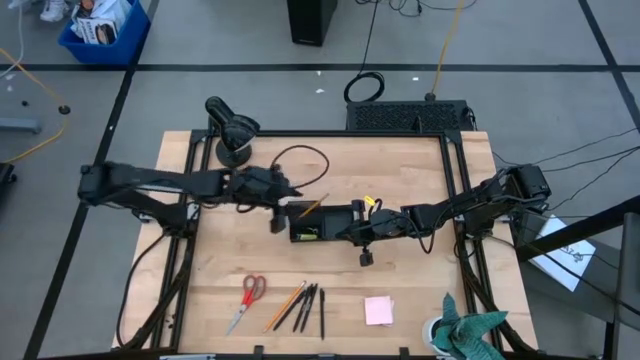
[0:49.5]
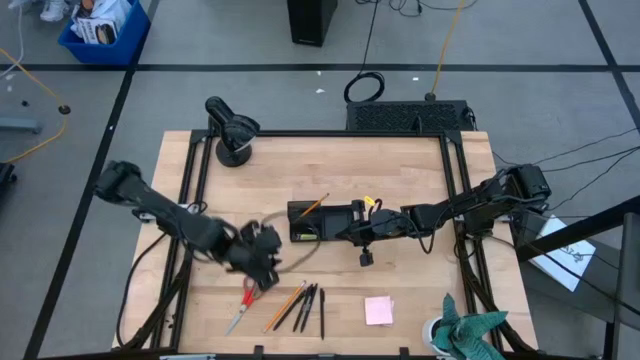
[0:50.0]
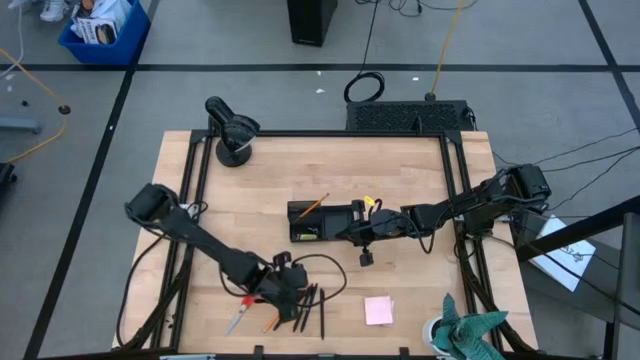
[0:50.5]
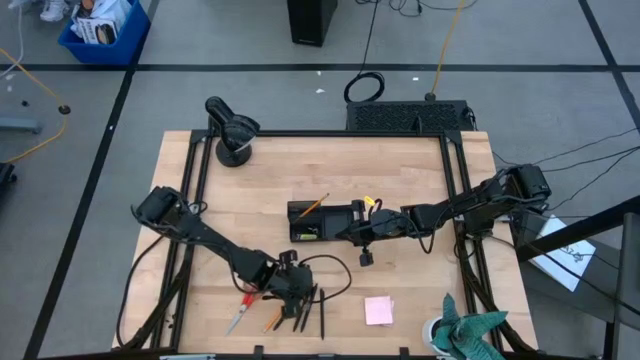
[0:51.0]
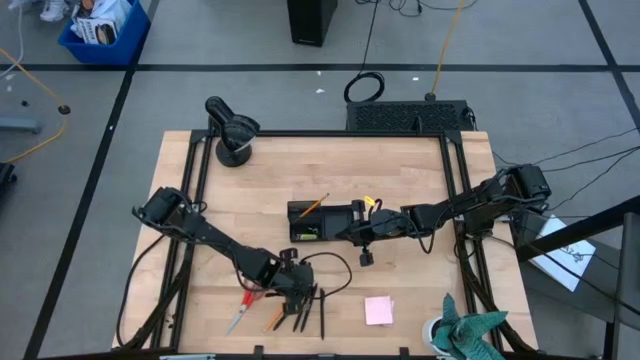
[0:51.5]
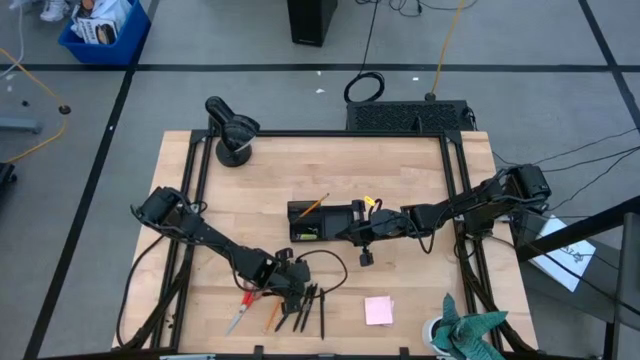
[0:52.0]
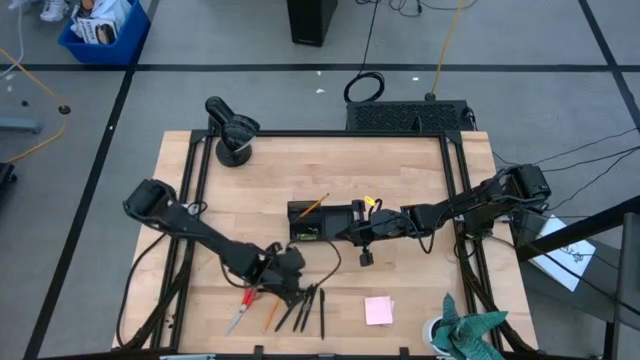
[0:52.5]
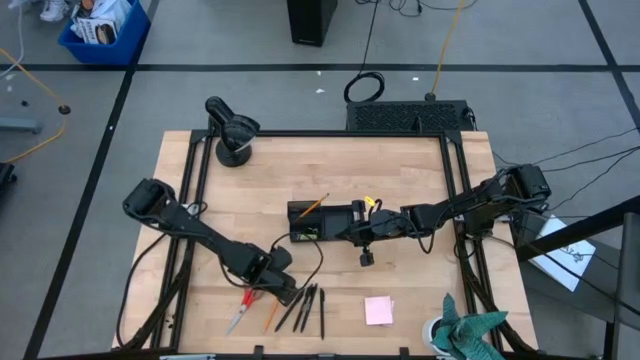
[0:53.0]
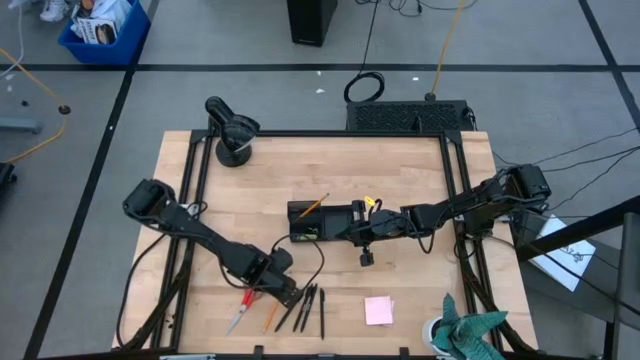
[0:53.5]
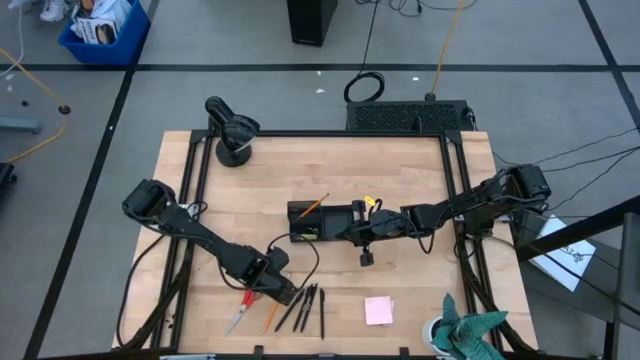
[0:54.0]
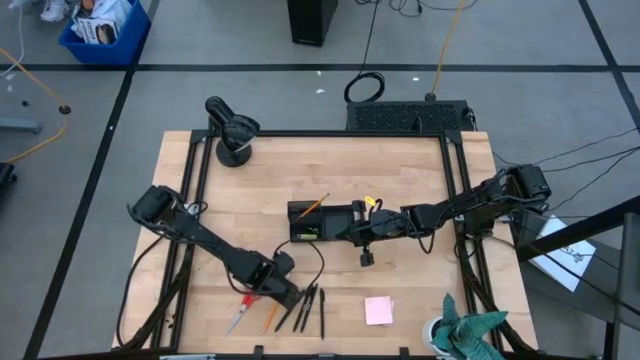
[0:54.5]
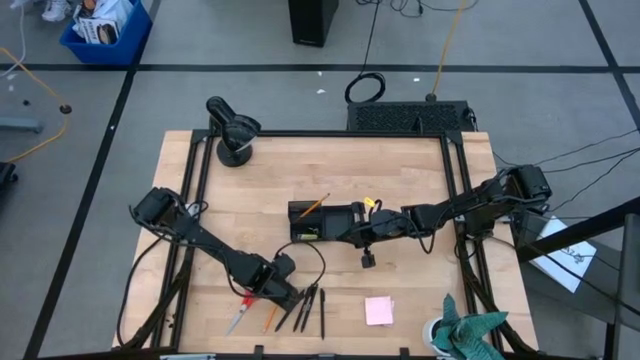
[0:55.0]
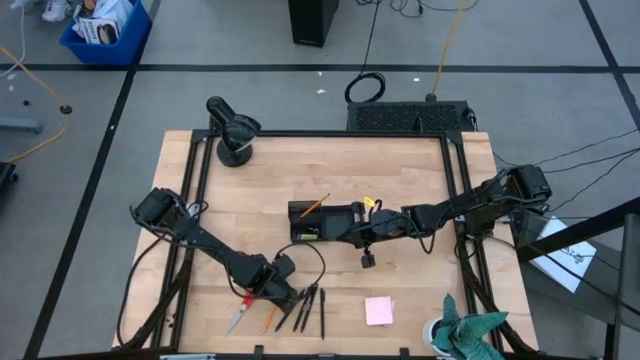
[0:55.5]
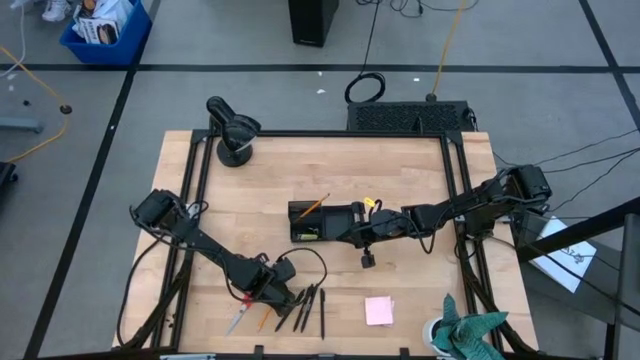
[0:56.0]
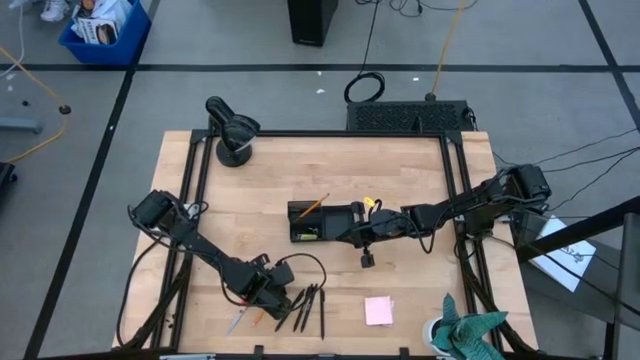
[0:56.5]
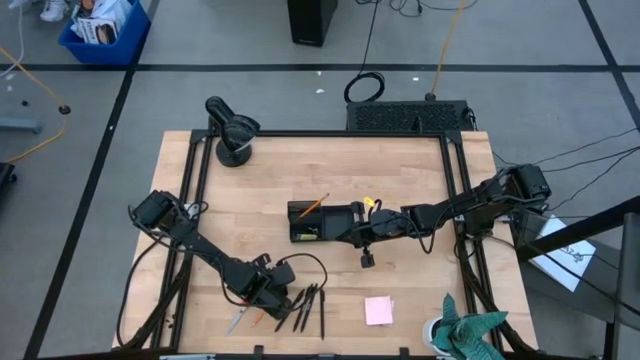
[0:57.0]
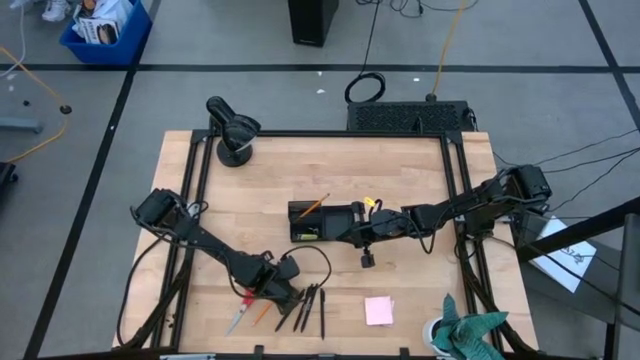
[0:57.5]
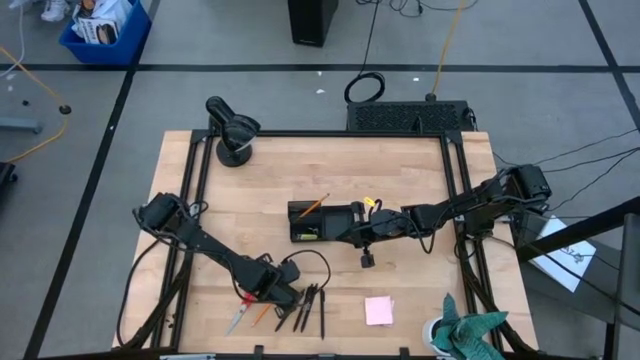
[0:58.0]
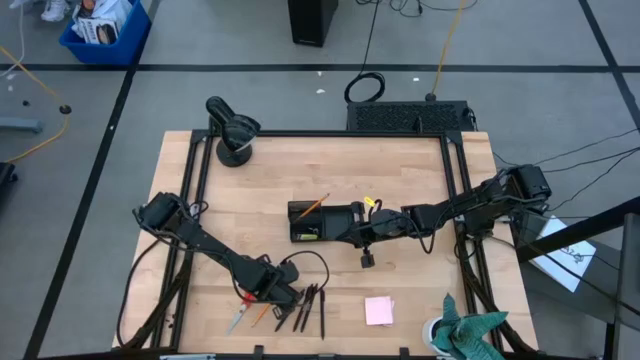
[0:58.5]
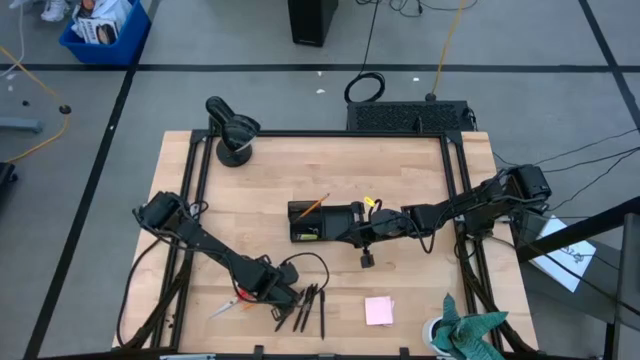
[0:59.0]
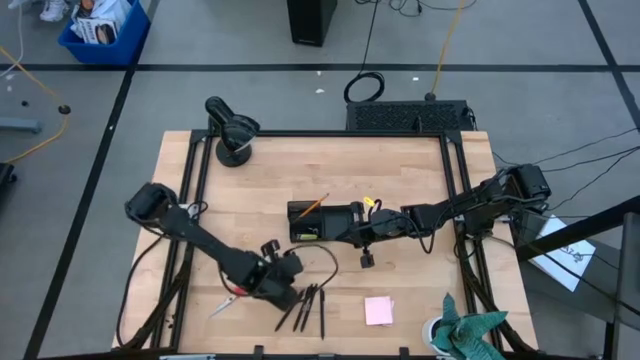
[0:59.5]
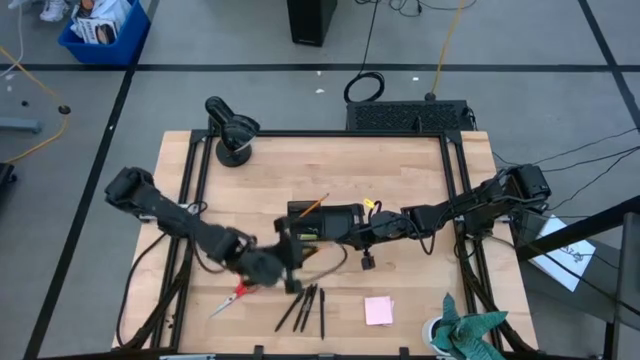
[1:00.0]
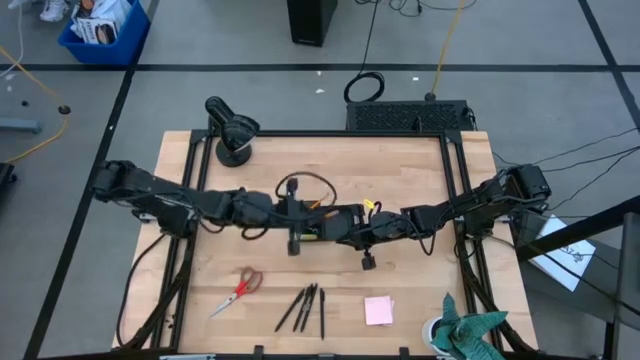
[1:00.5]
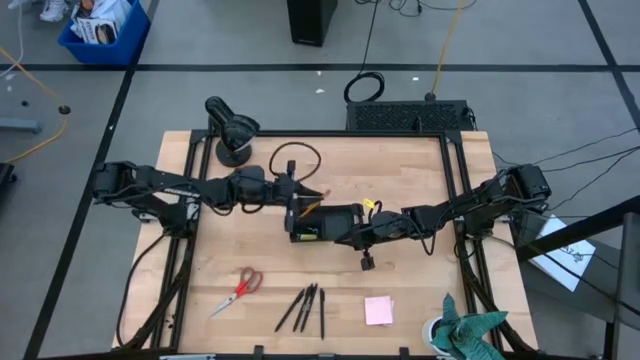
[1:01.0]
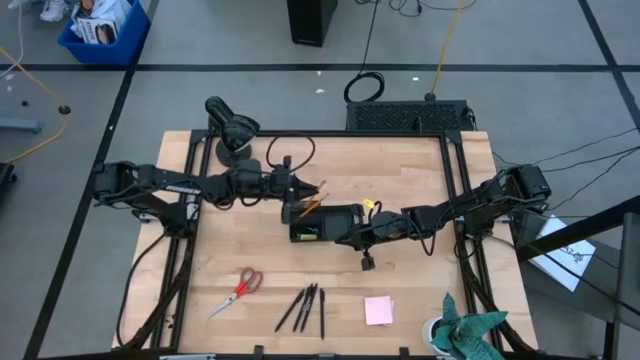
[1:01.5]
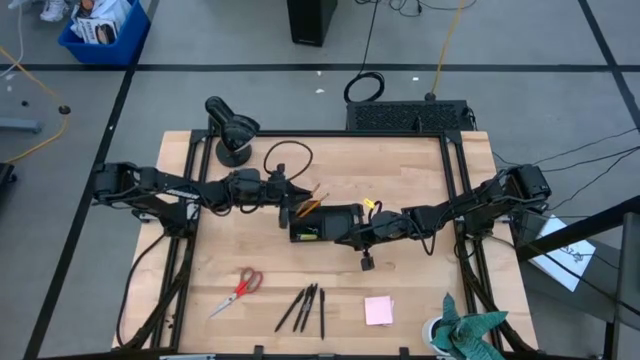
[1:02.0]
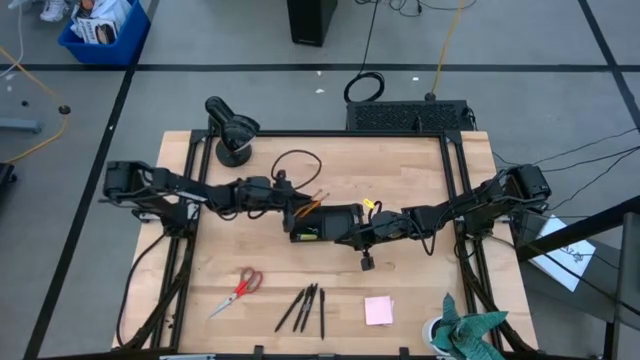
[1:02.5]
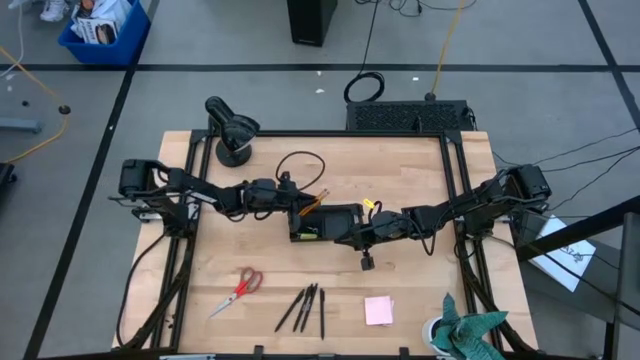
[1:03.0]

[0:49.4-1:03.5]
Task: Pick and place office supplies into organizer
Put the yellow pencil into the black desk organizer

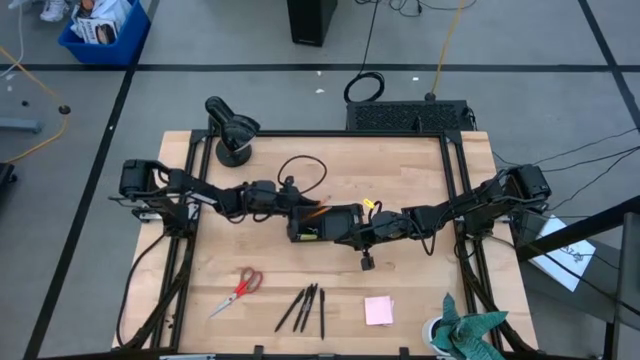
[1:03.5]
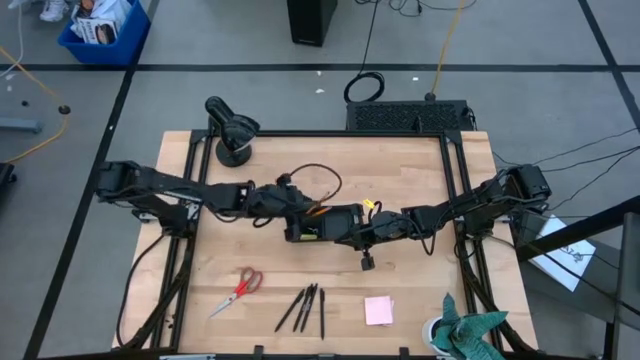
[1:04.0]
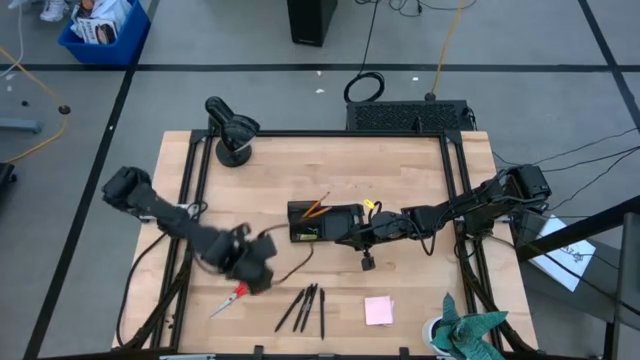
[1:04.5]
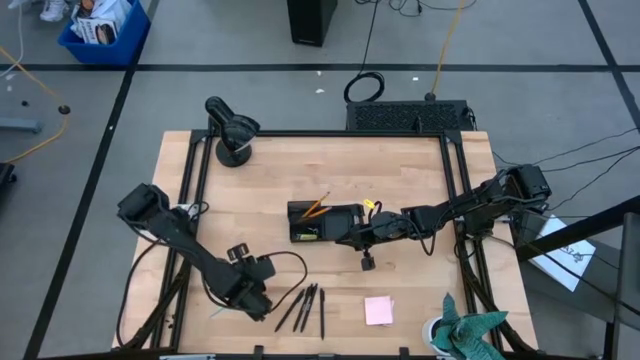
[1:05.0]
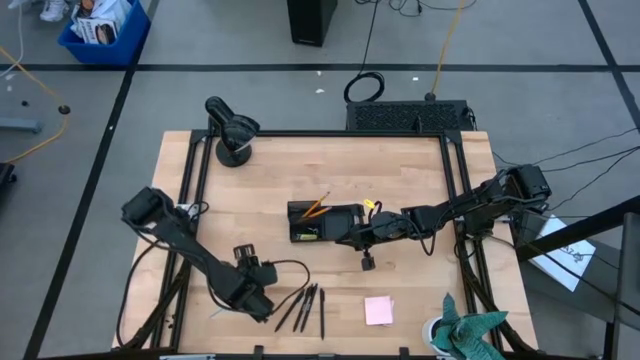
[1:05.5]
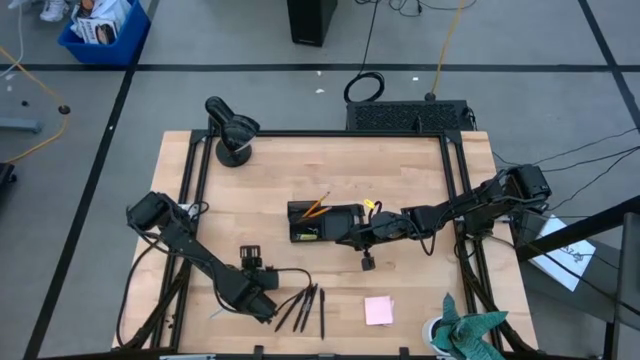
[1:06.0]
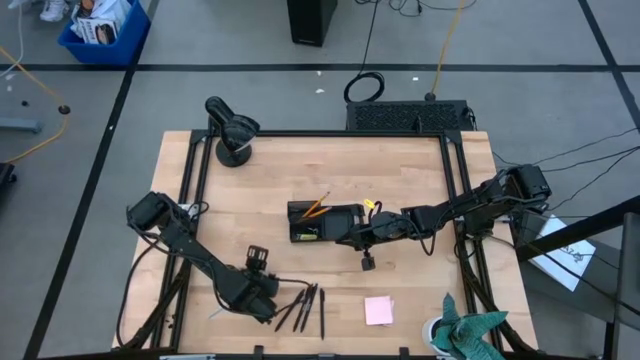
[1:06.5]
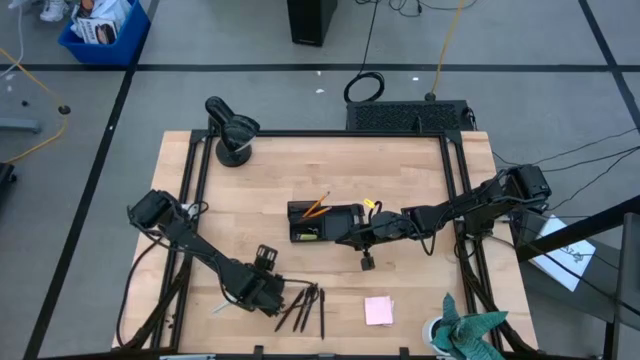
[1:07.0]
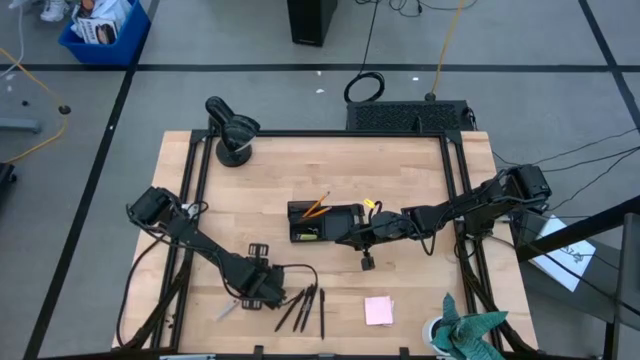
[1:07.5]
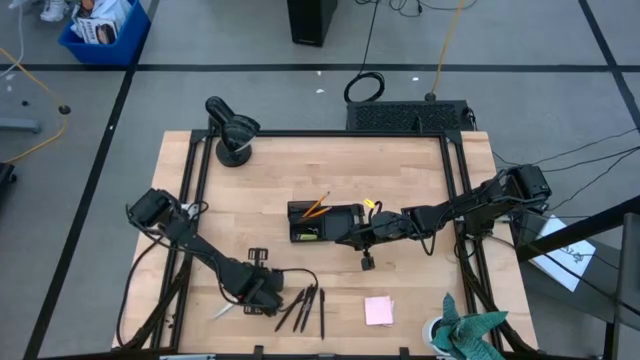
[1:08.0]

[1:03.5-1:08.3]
Put the red scissor into the black desk organizer
